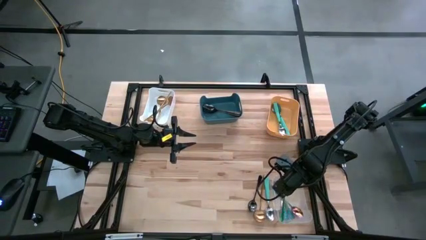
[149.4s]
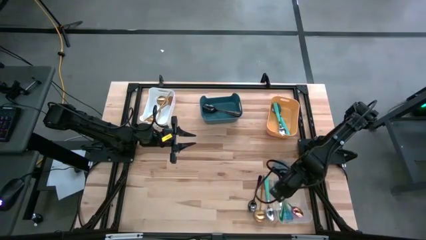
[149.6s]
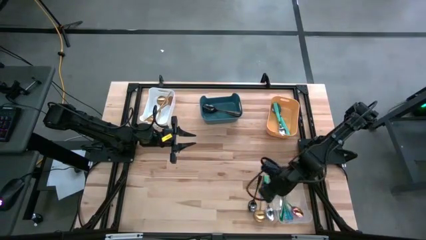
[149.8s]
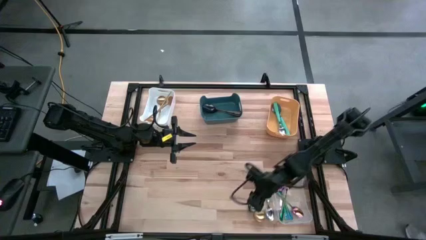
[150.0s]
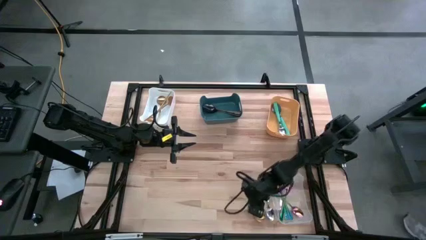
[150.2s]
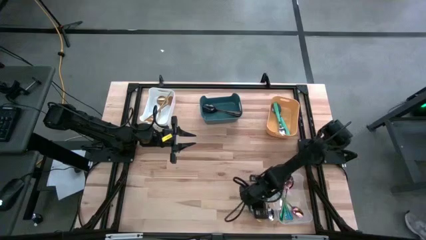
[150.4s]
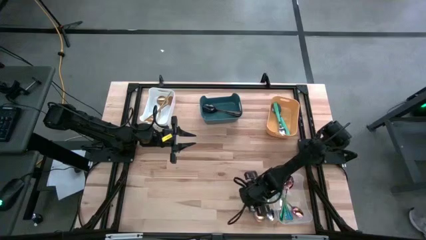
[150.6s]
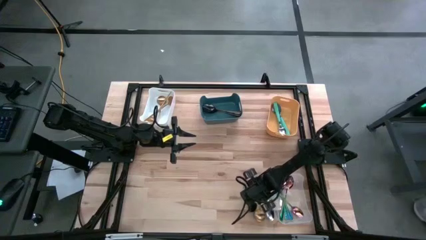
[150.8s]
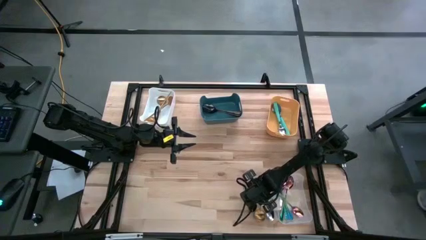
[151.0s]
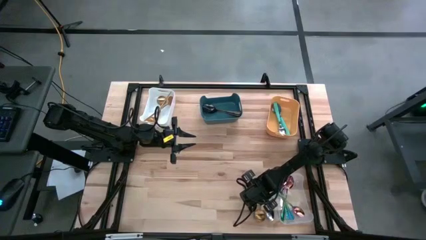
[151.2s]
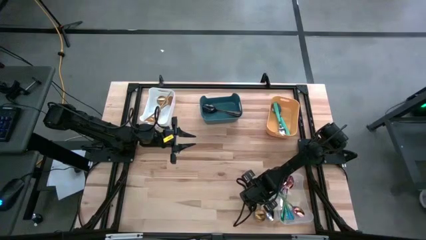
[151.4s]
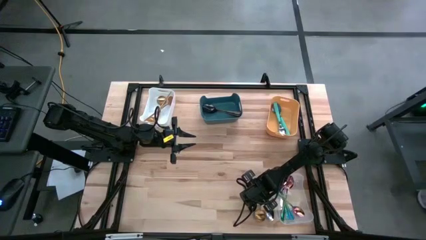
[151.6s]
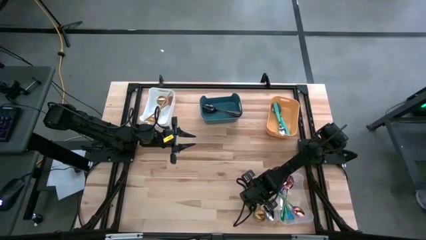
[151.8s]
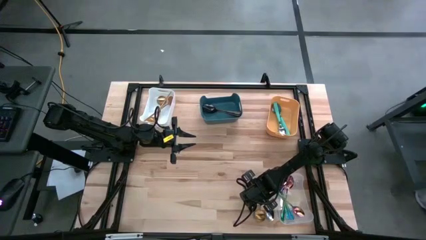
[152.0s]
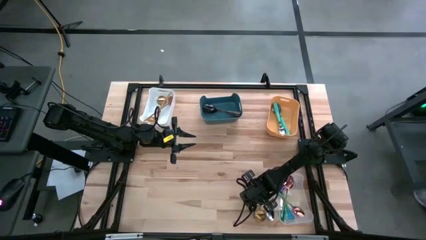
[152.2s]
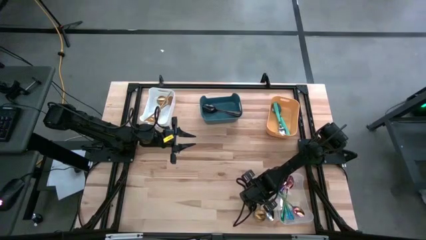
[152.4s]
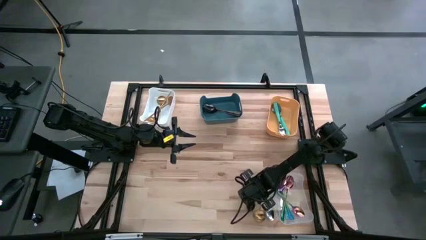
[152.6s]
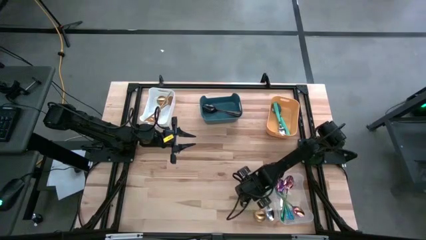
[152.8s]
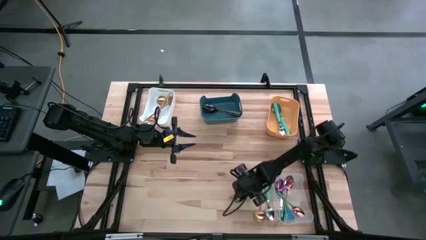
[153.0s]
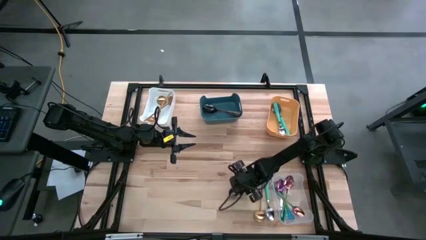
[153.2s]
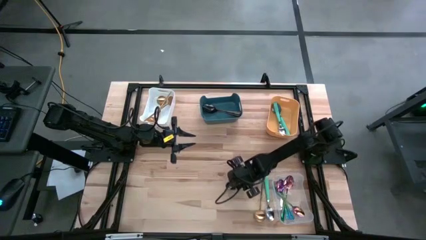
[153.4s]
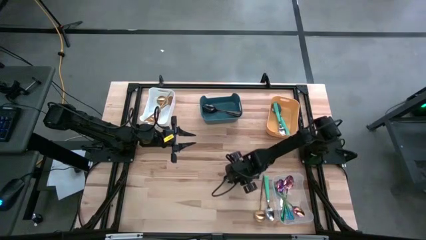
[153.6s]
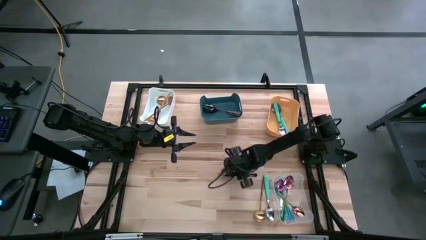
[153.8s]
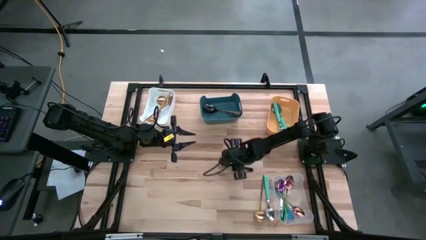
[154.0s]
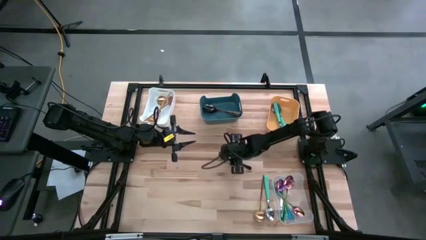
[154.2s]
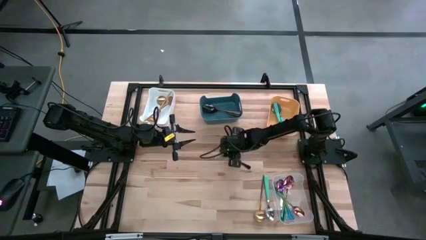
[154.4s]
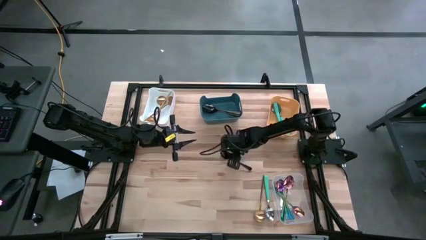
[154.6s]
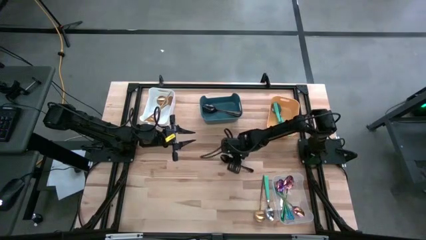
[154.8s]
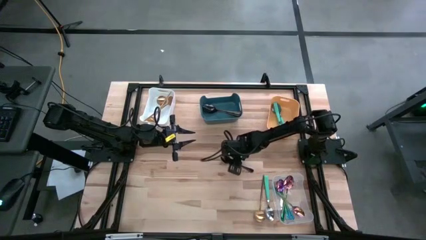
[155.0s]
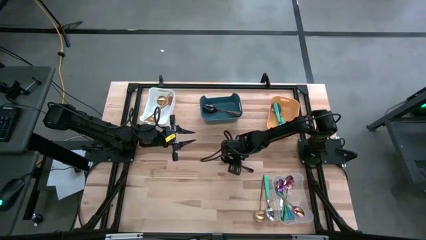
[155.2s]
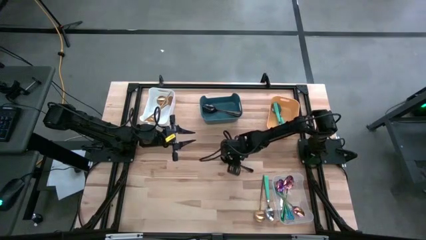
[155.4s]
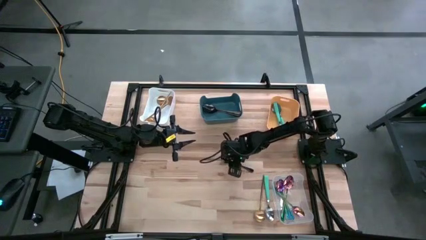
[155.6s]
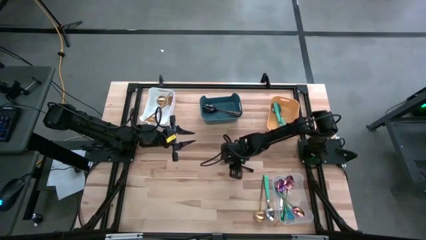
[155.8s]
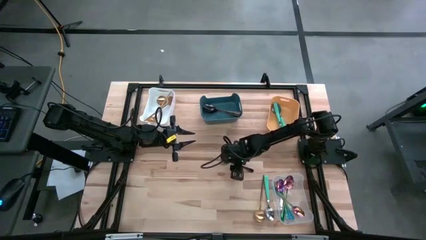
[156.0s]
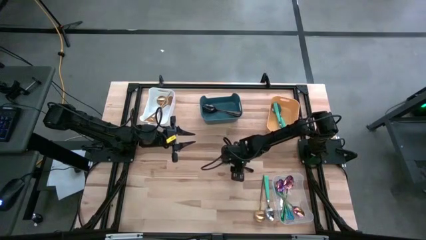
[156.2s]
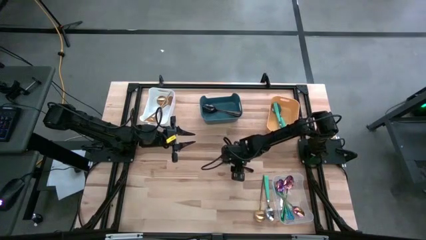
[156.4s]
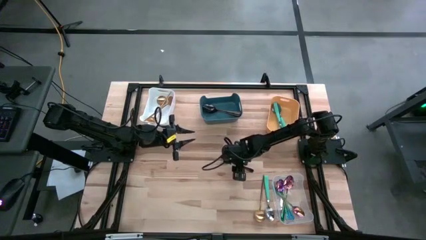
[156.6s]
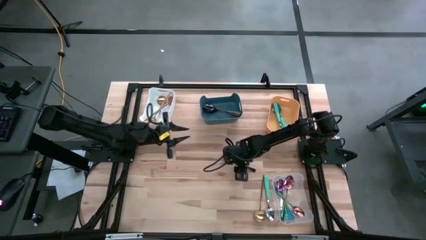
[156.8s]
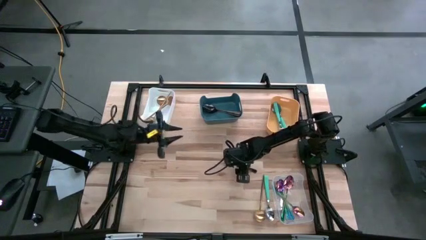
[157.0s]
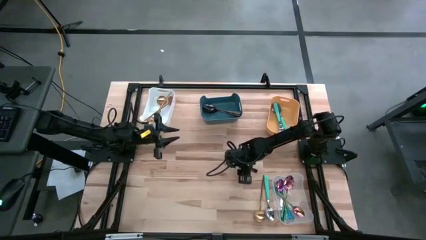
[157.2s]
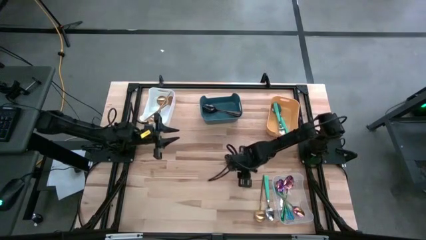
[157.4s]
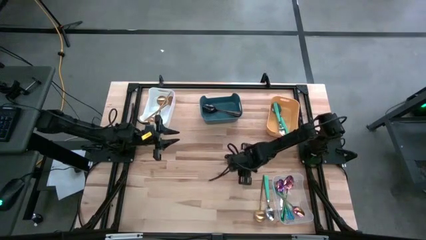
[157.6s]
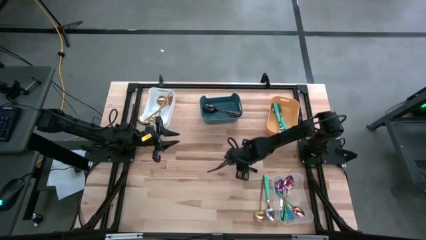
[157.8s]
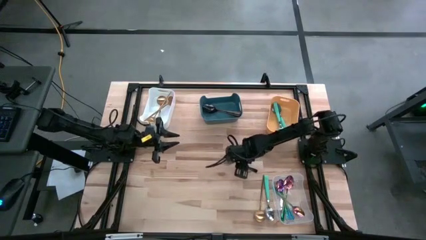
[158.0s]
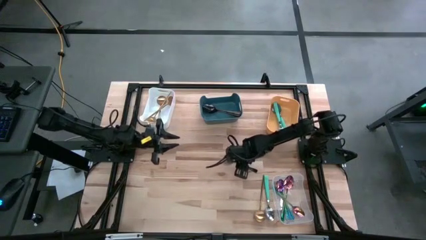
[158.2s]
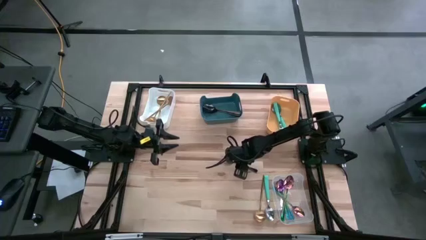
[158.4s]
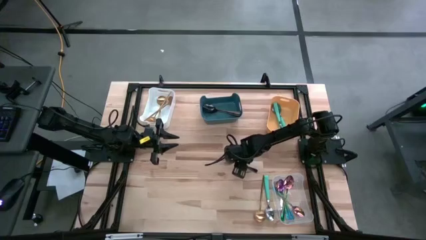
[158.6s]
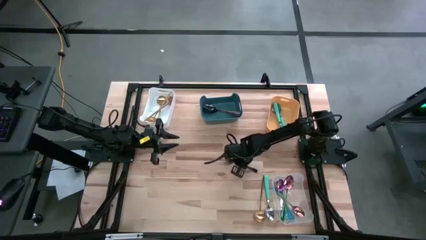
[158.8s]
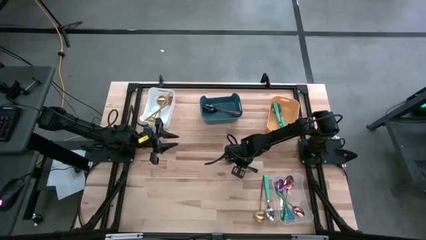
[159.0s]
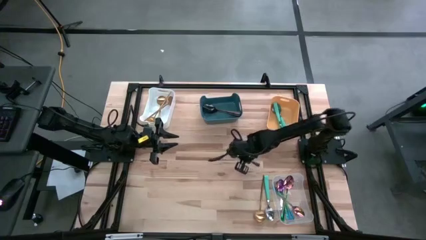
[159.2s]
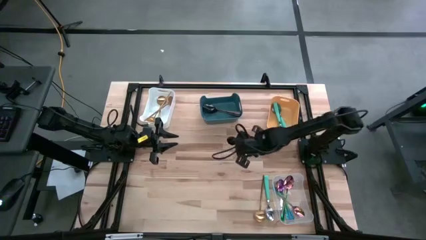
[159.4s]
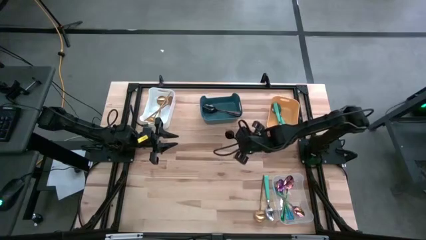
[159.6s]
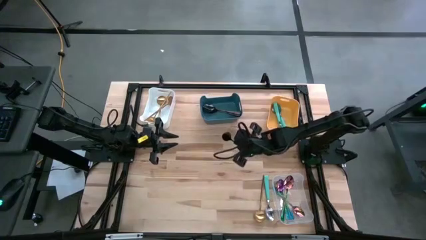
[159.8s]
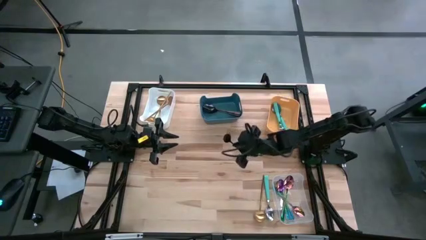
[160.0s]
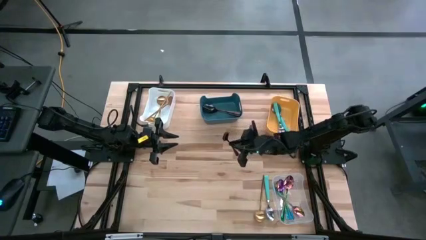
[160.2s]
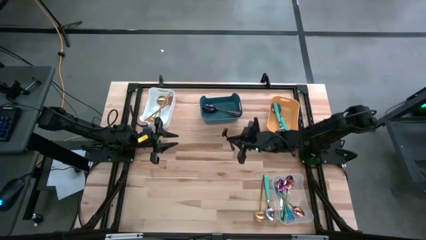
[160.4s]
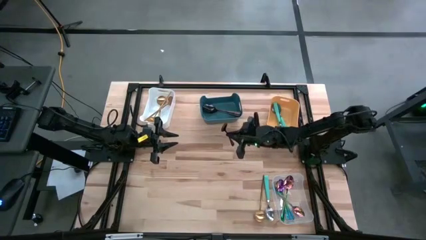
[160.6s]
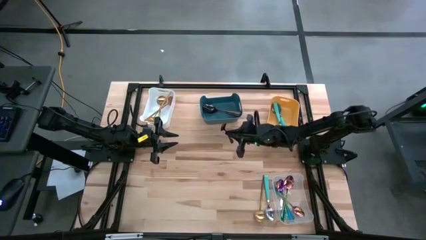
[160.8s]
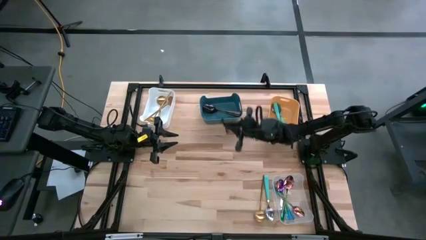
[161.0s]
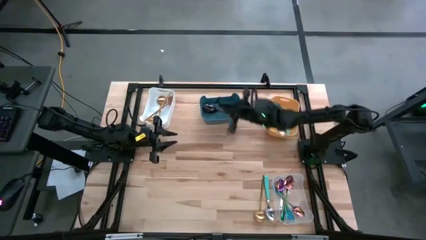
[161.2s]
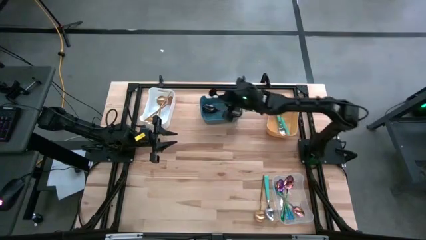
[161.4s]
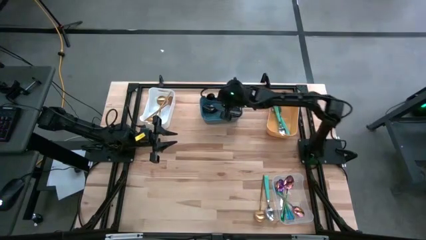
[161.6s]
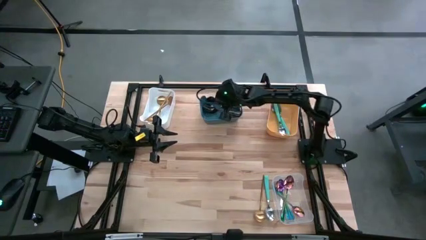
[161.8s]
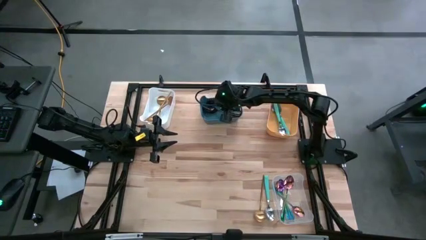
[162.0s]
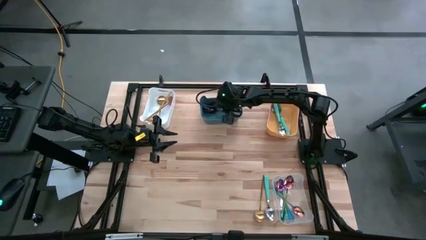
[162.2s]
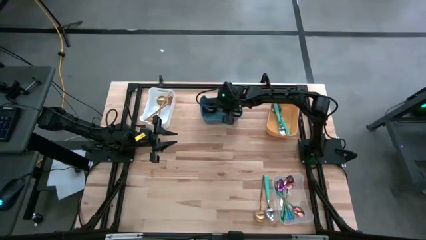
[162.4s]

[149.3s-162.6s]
Task: Sort silverware by color (type)
Put the black spoon into the blue bin
